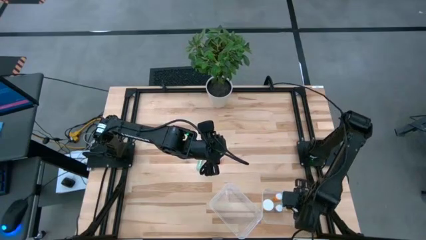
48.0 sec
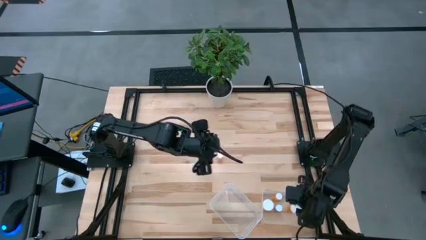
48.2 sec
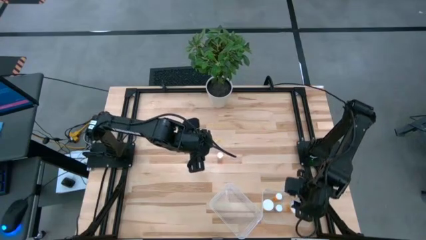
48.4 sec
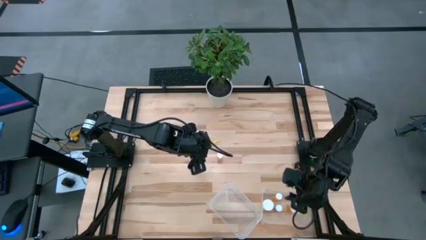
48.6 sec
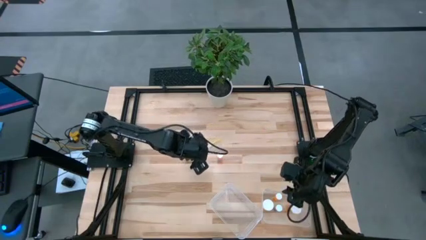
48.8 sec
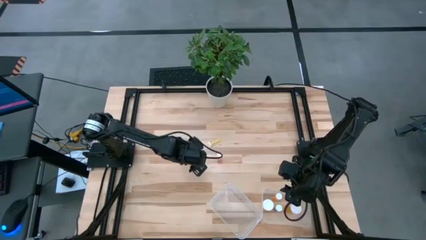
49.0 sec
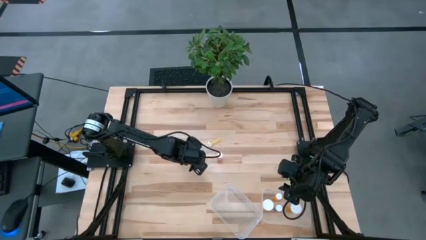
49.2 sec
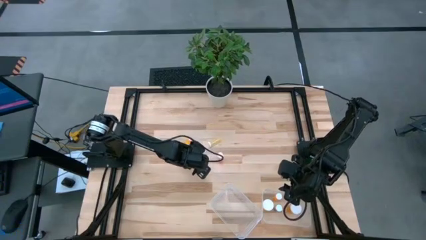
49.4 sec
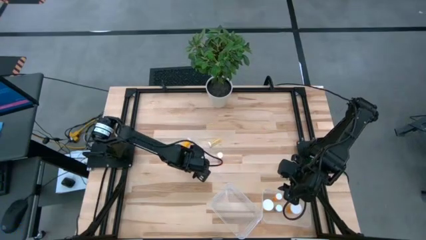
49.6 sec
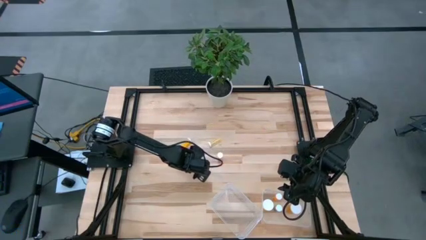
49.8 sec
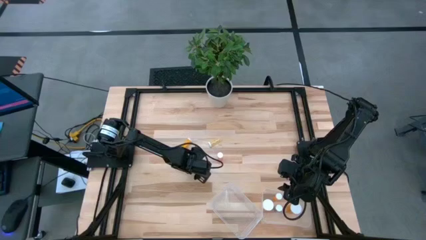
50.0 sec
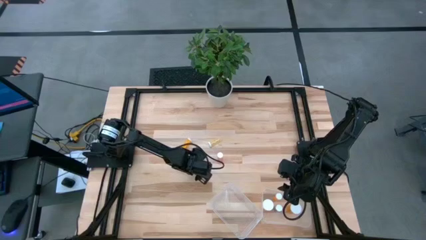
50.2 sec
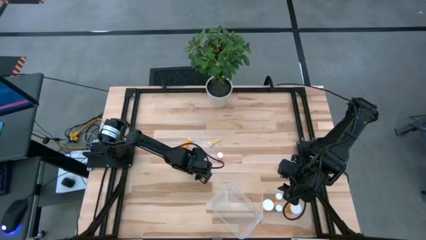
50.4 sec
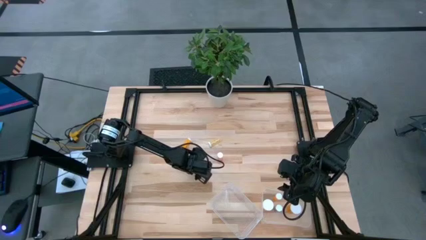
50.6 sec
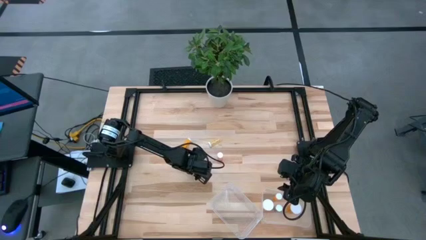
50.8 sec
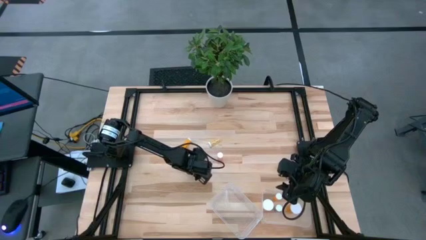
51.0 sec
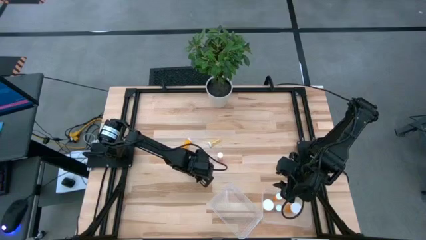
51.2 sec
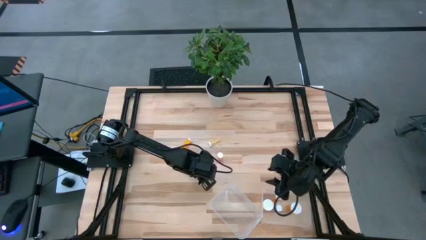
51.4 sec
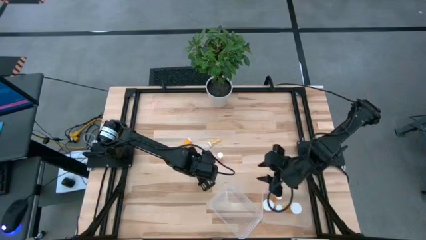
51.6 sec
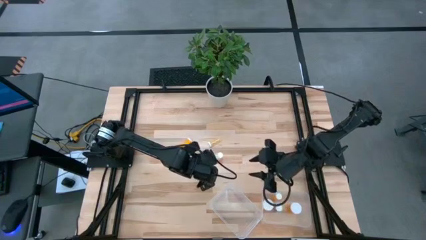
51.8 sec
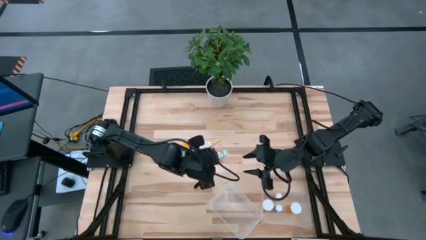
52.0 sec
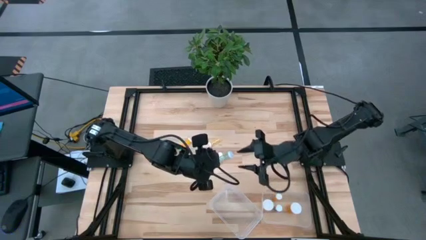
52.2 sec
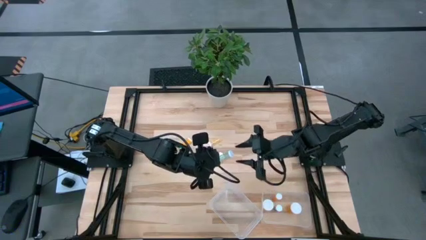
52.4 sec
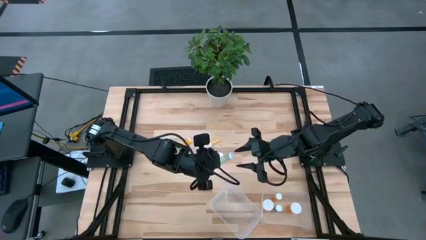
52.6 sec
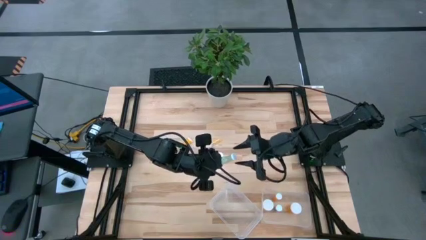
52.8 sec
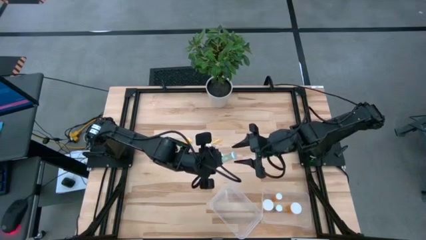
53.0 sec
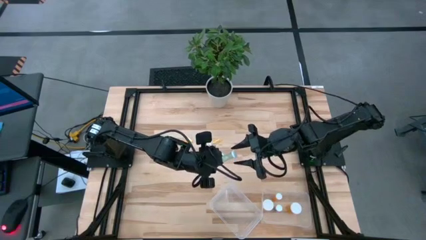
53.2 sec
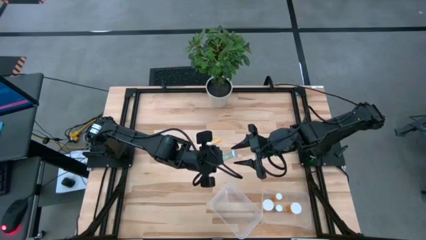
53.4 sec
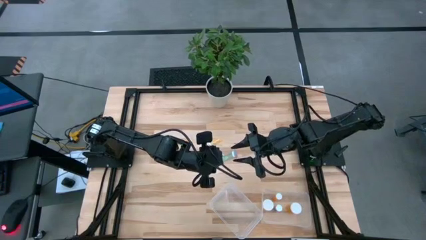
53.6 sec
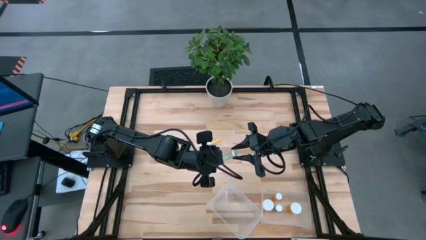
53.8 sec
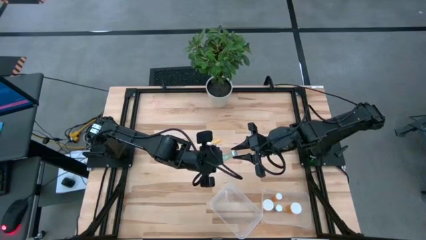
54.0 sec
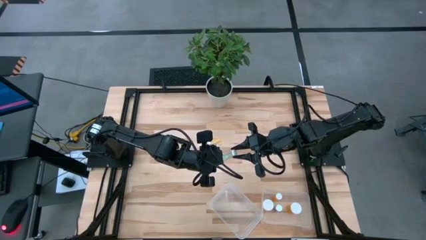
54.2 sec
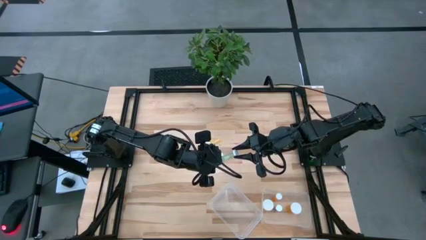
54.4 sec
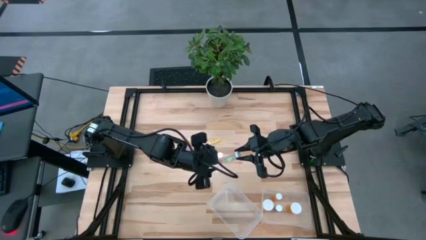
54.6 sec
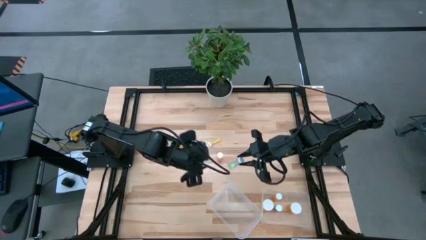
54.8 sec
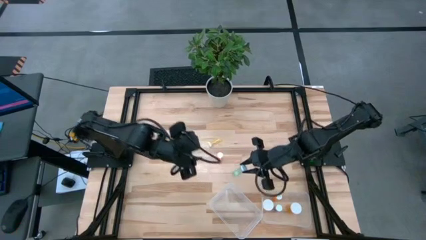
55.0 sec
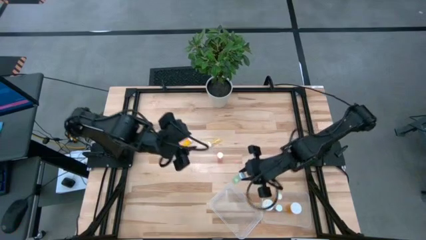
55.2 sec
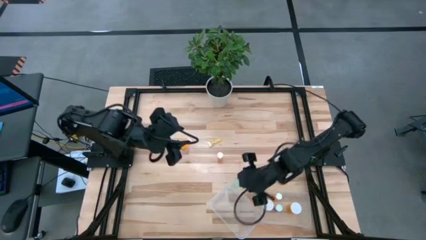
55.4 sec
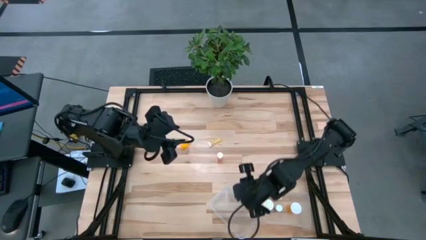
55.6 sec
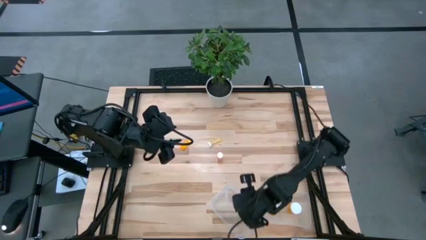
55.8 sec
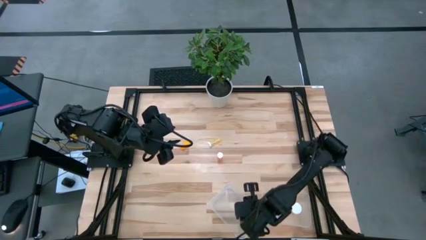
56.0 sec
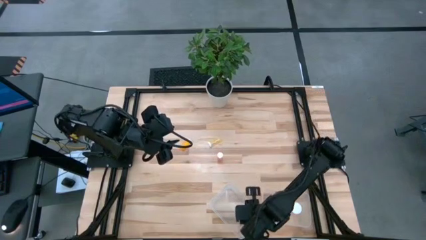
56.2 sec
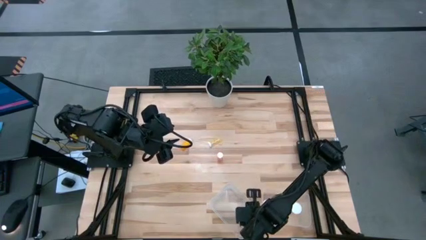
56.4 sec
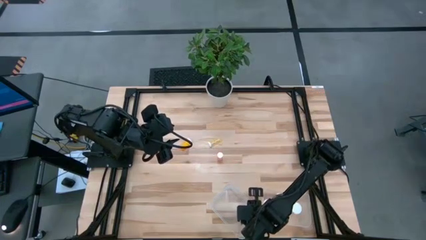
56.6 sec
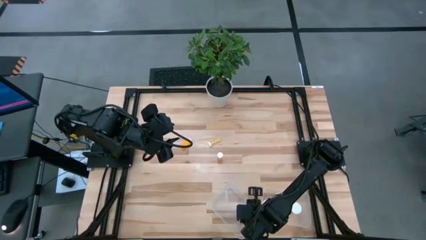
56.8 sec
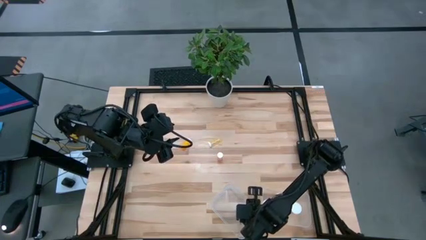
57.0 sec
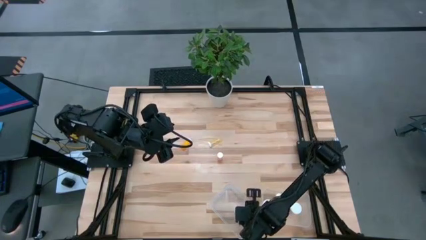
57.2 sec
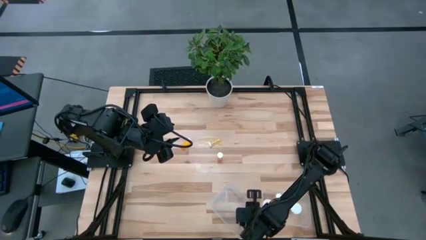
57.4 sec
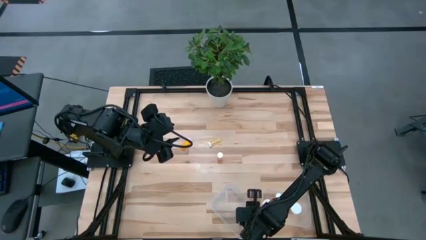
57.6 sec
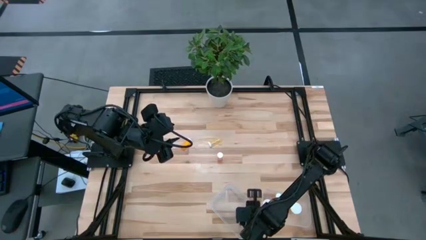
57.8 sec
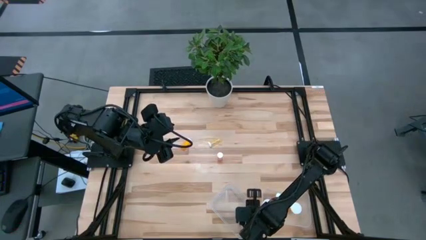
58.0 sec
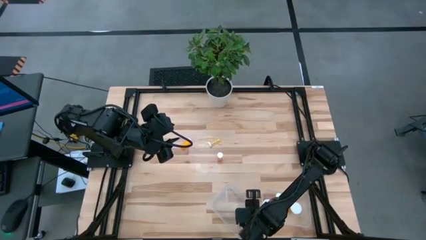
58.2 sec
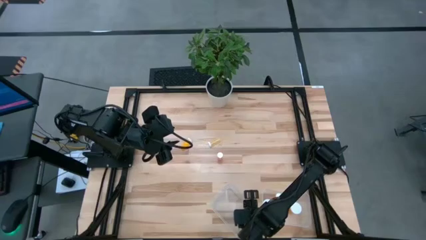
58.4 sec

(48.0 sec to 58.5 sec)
Task: Pick and place medicine bottles into bin by pill shape (circle, oval)
Put the blue green pill bottle into the left transparent bin

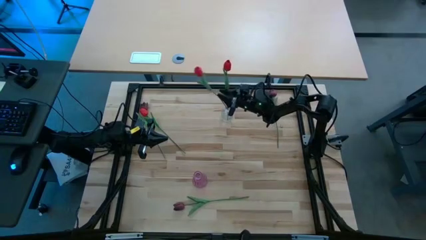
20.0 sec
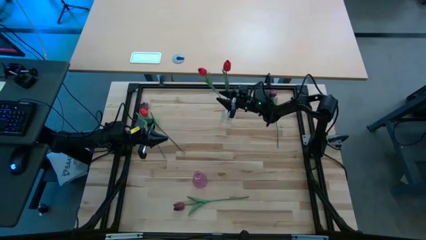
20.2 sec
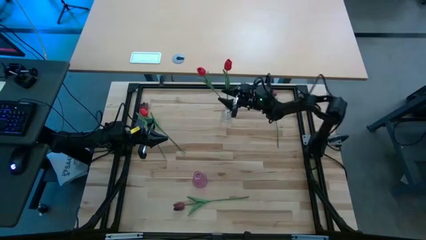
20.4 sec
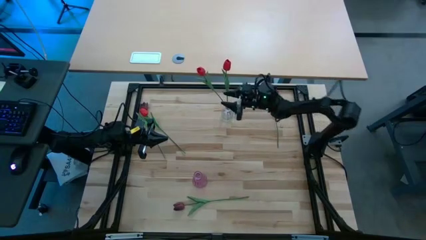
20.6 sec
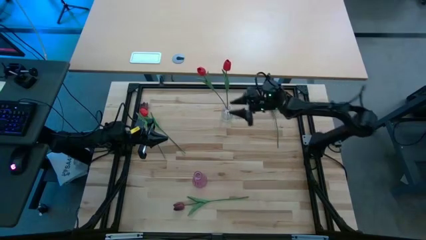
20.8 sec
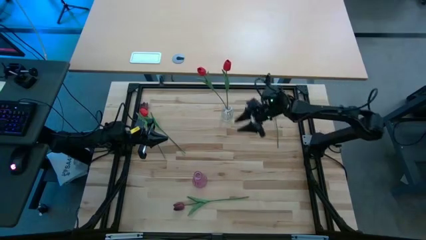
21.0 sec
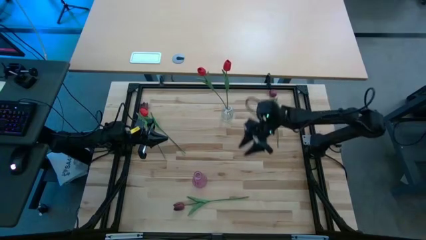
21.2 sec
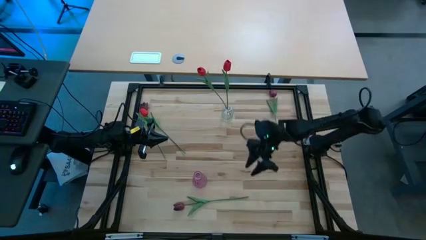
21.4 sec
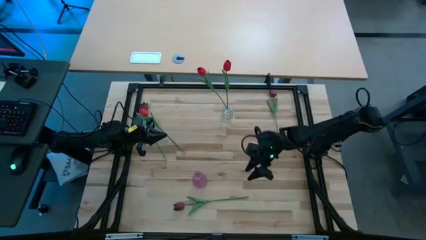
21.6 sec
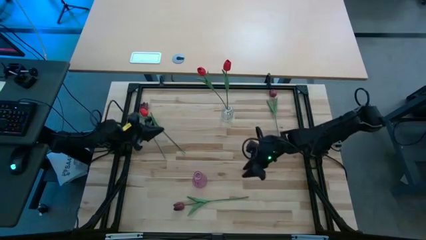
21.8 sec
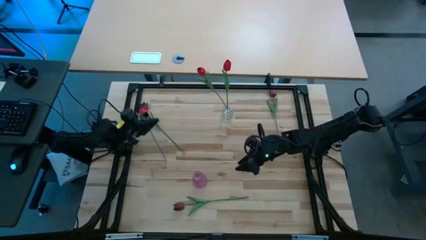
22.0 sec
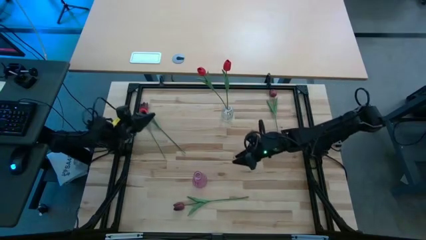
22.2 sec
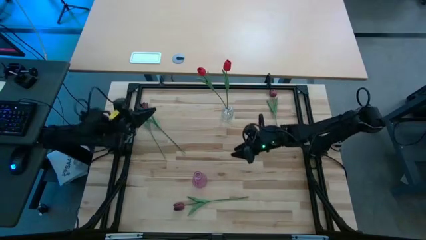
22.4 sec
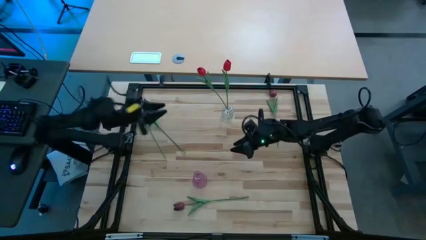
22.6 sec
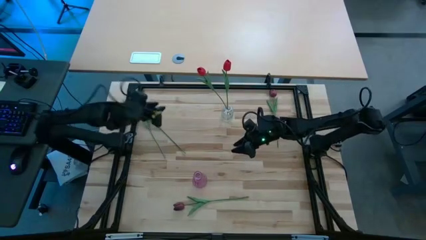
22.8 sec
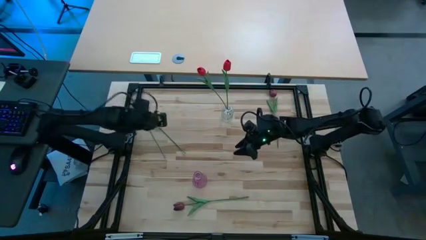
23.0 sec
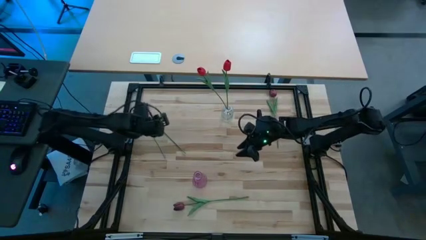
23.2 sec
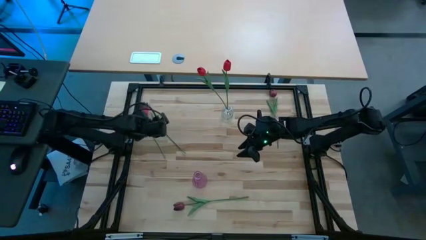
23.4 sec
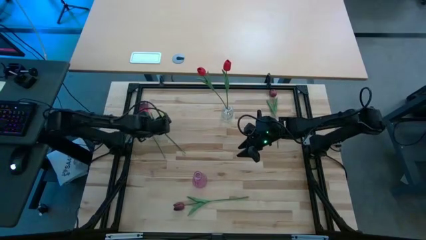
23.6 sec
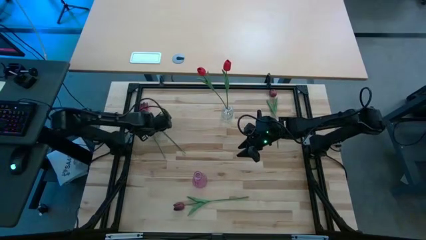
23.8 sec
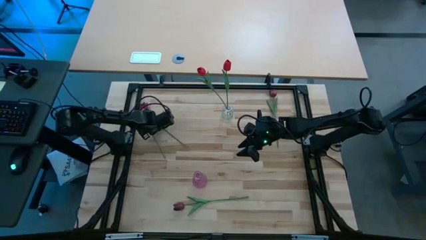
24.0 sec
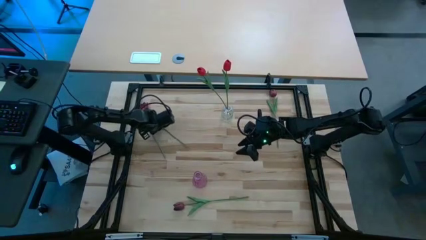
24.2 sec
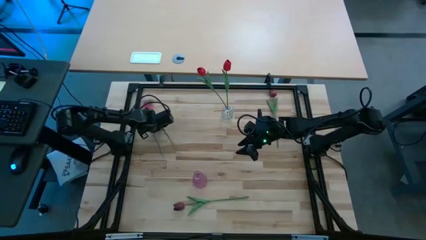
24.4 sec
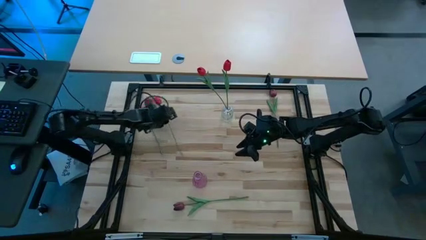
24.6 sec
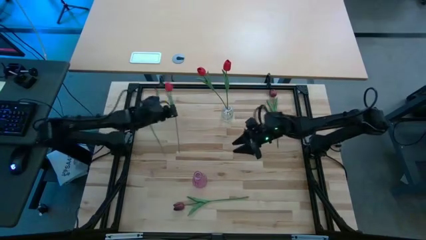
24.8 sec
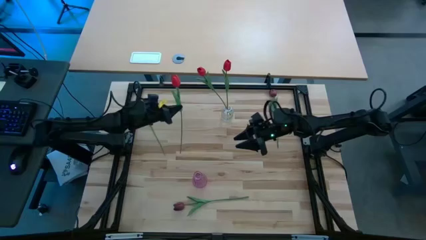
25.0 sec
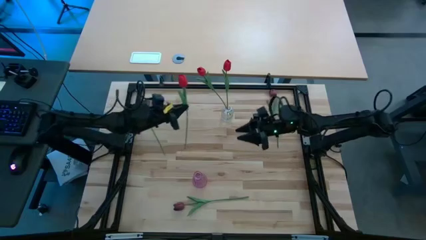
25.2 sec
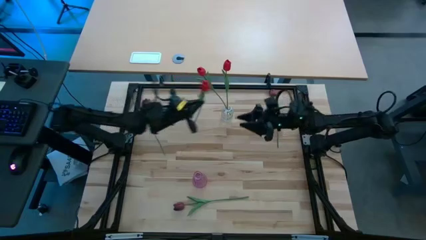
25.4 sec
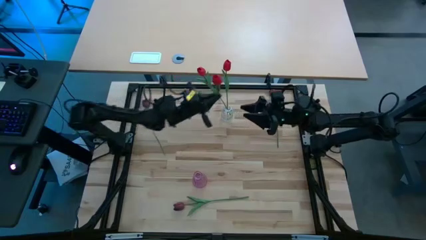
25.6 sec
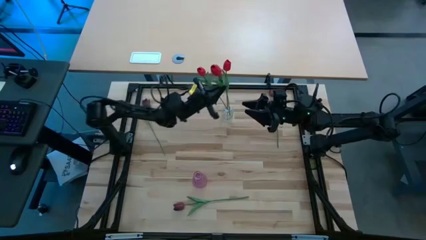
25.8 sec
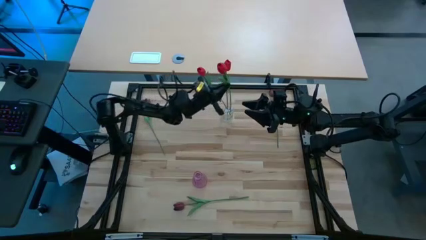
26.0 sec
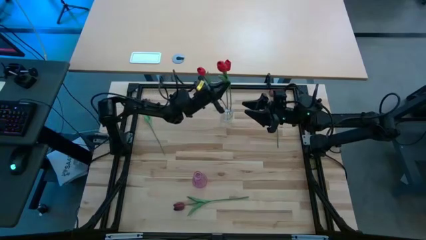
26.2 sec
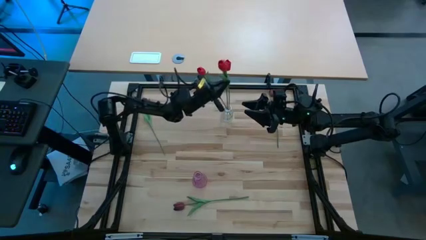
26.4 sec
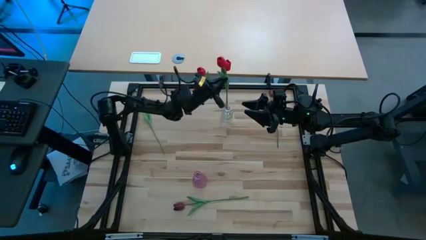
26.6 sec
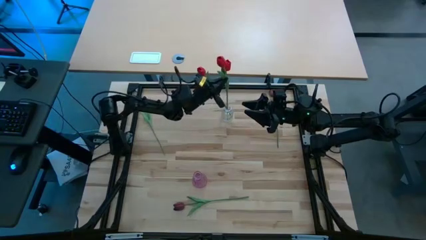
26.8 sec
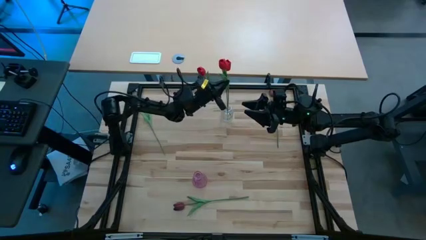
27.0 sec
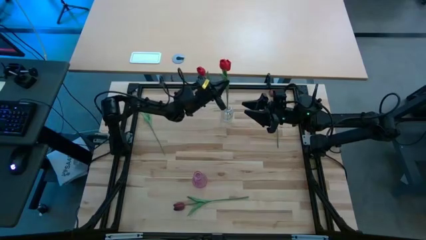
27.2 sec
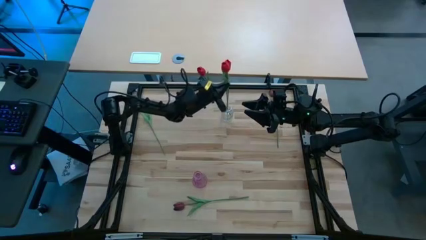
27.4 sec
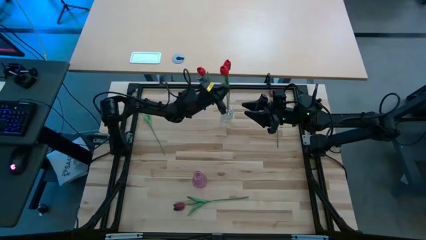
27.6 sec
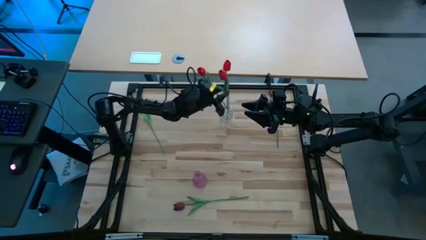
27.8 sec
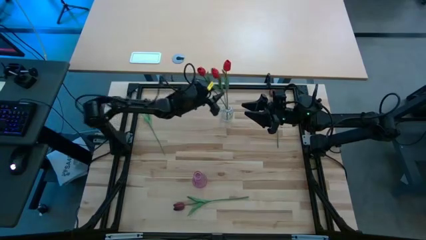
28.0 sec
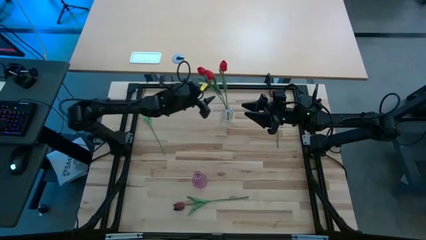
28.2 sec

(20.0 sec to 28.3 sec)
Task: Sort flowers into vase by color
Put the red tulip into the transparent flower vase
